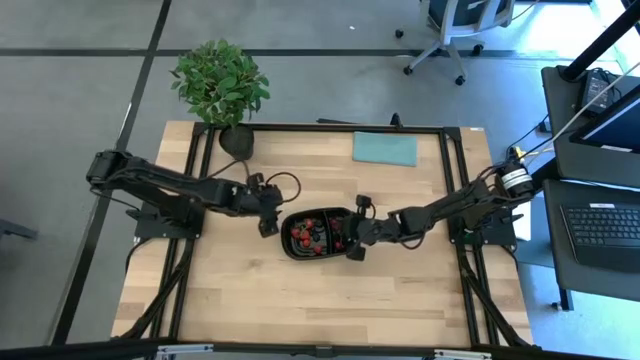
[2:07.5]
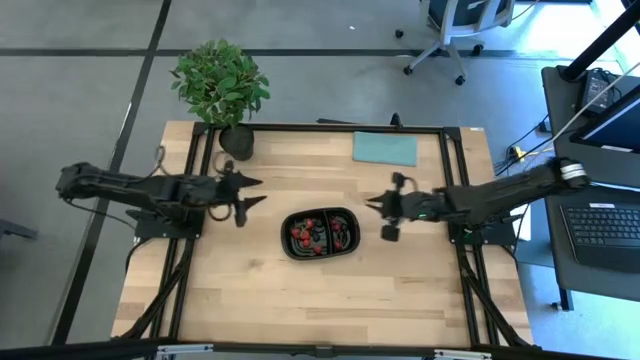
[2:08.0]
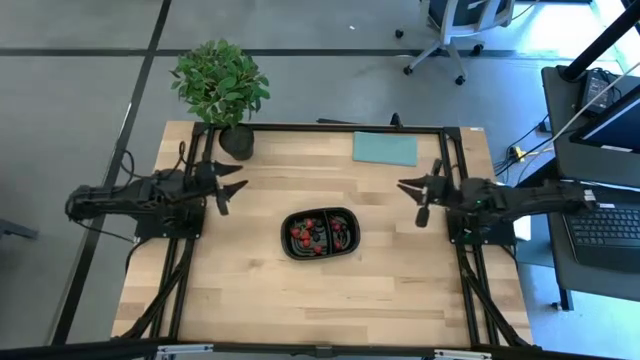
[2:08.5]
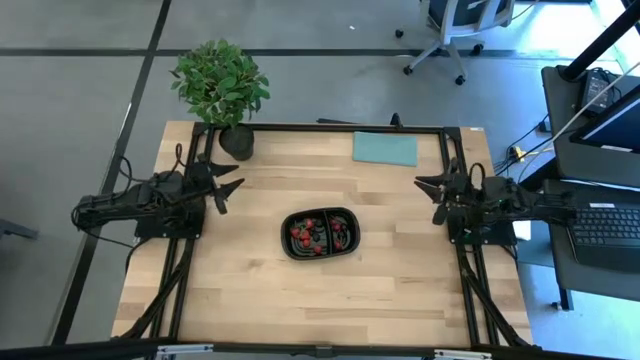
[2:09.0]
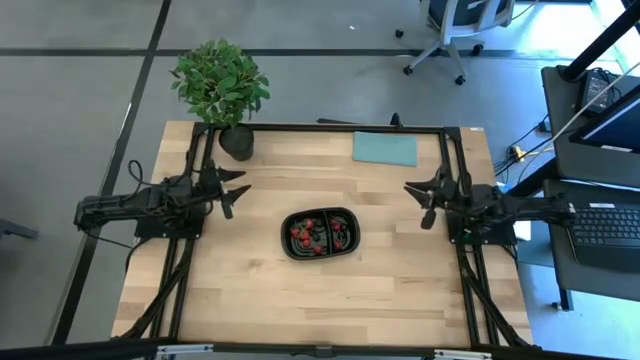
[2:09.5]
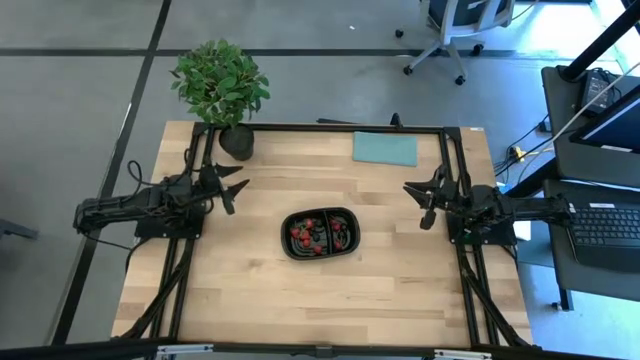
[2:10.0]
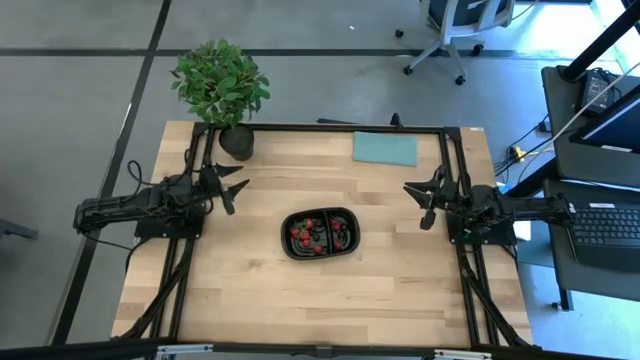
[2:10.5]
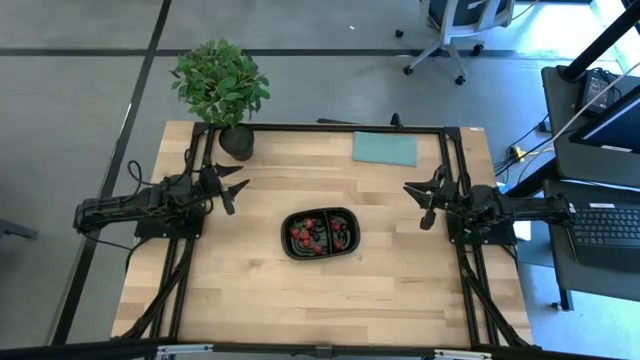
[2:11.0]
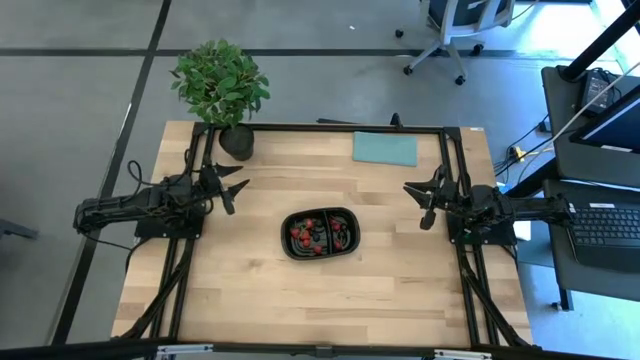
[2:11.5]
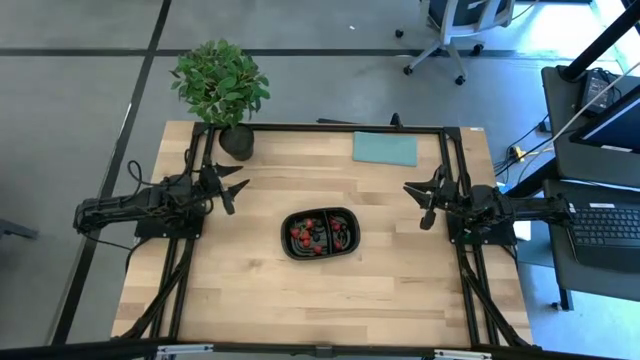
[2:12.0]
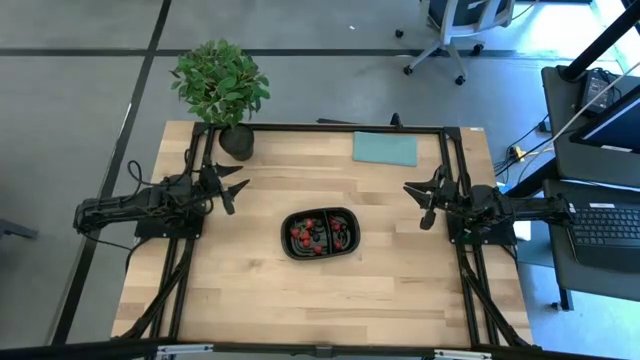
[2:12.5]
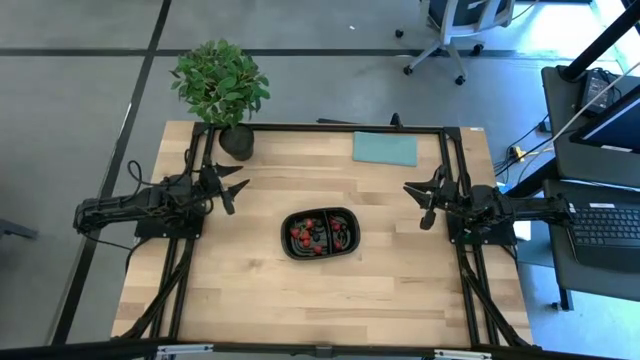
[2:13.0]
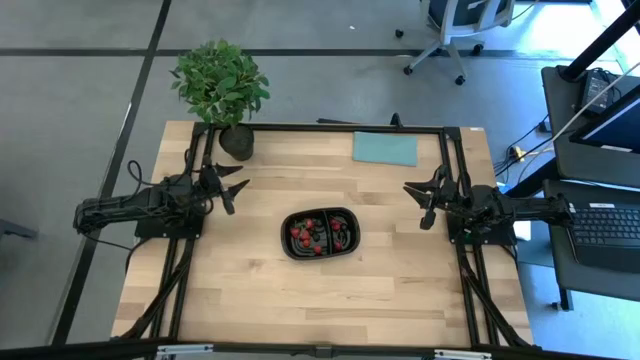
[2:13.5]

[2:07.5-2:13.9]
Task: Pick and placing Produce into tupperware
Return to Home Position

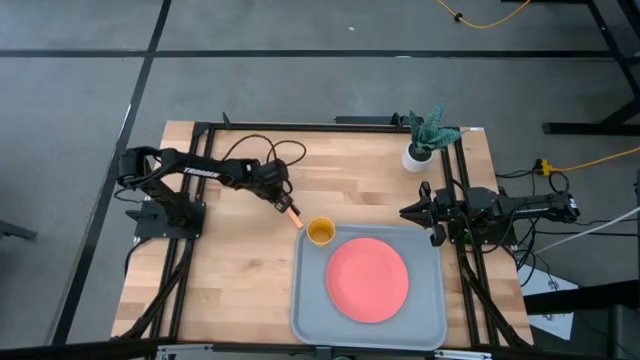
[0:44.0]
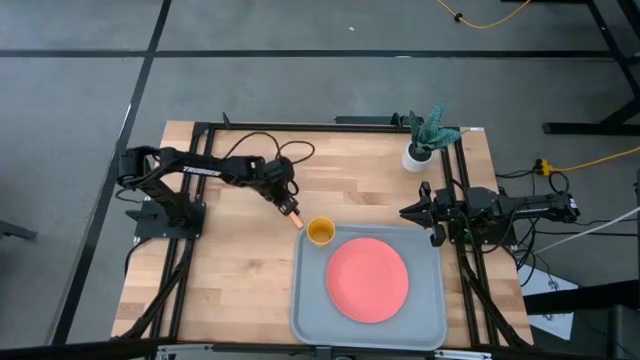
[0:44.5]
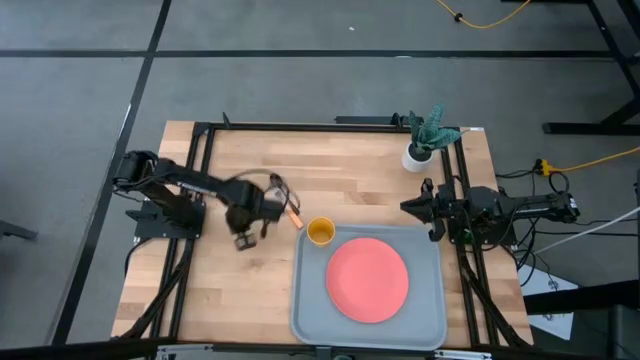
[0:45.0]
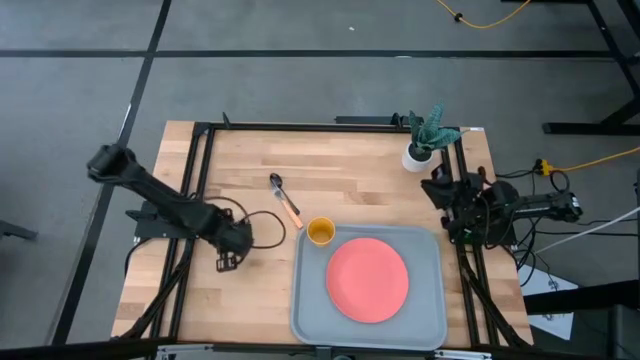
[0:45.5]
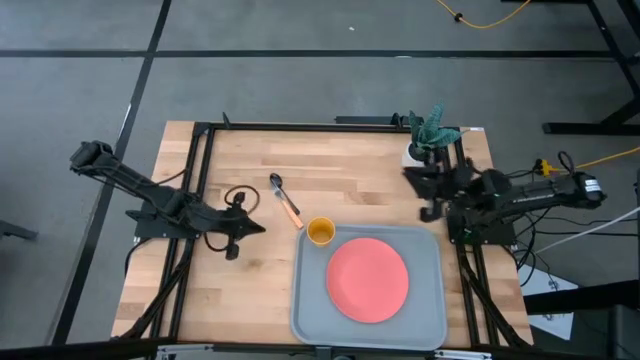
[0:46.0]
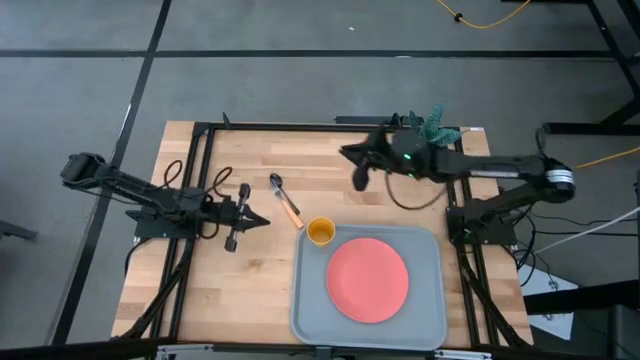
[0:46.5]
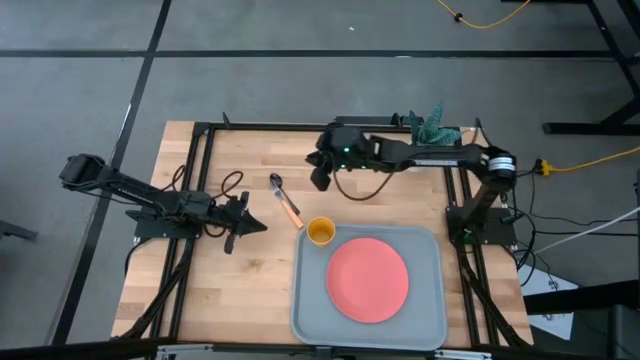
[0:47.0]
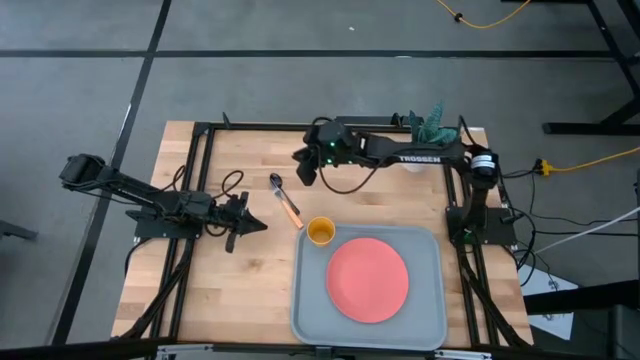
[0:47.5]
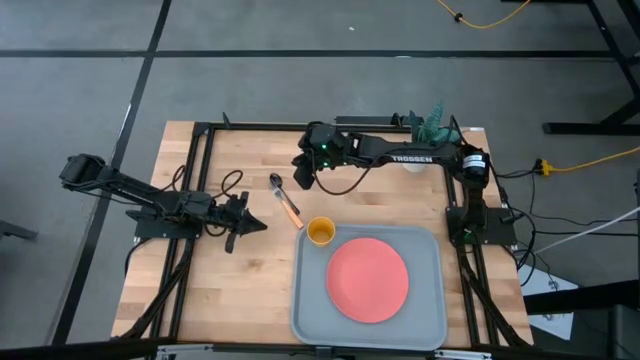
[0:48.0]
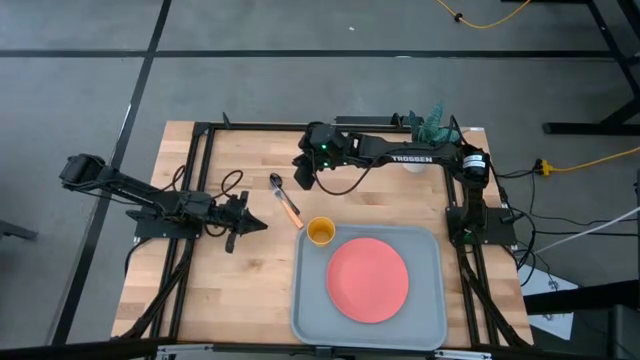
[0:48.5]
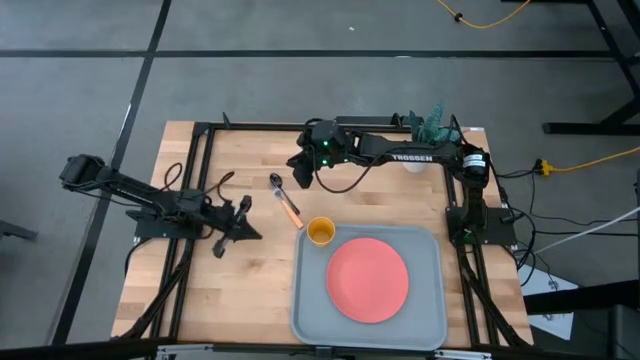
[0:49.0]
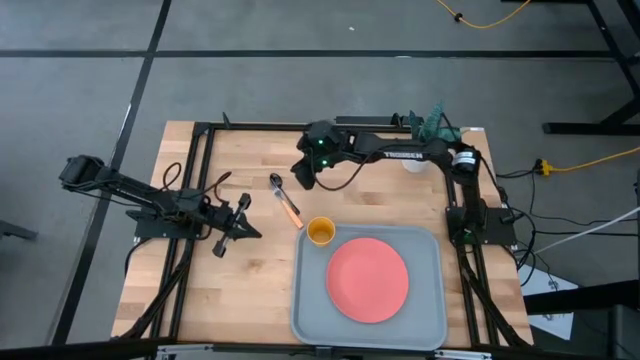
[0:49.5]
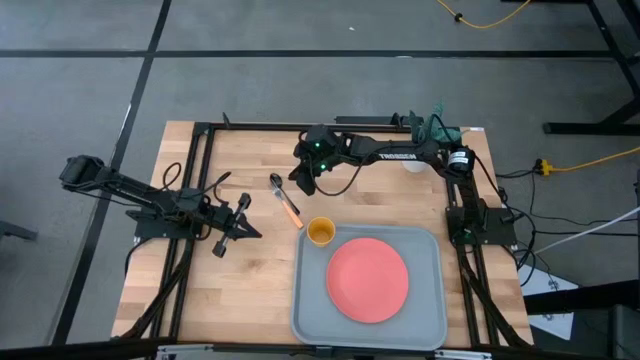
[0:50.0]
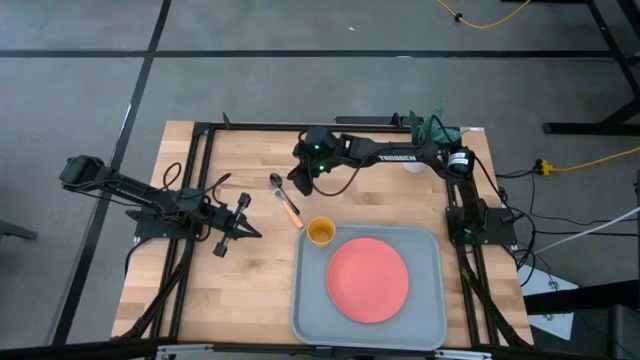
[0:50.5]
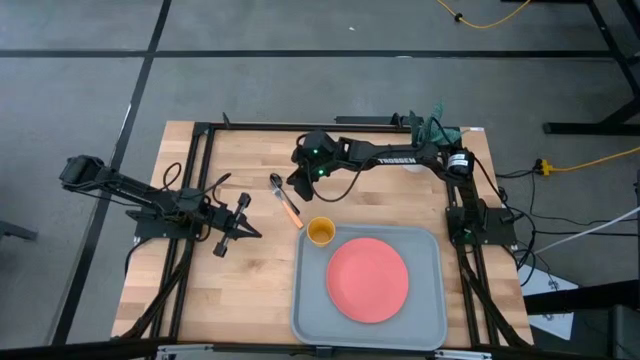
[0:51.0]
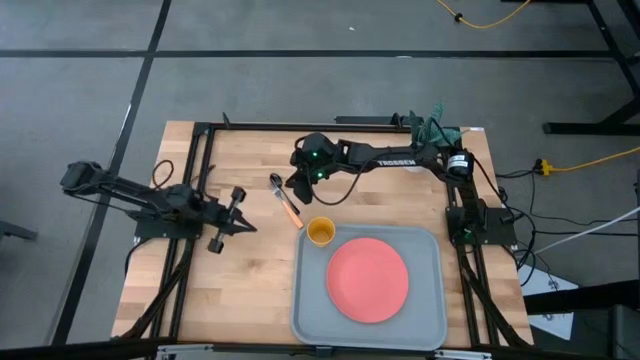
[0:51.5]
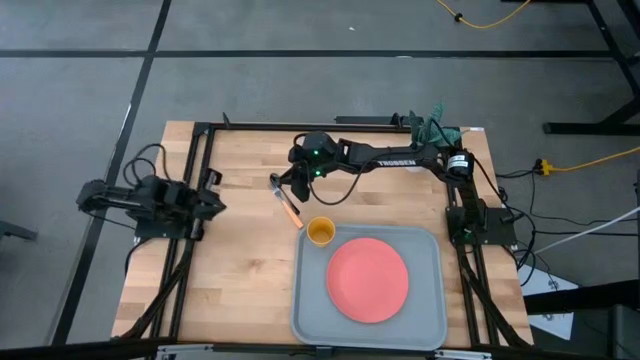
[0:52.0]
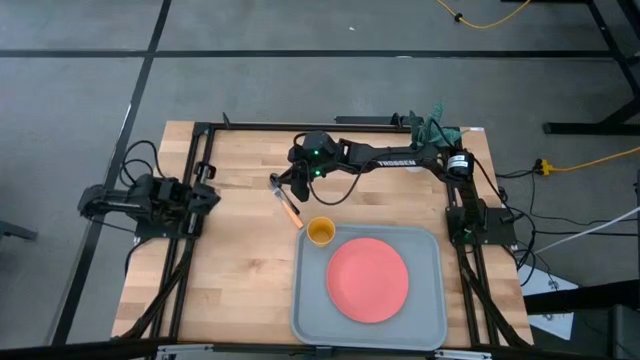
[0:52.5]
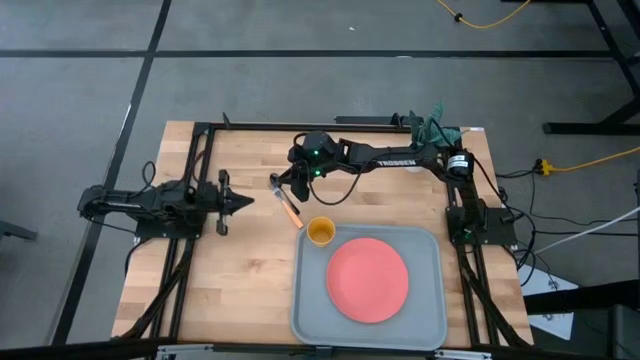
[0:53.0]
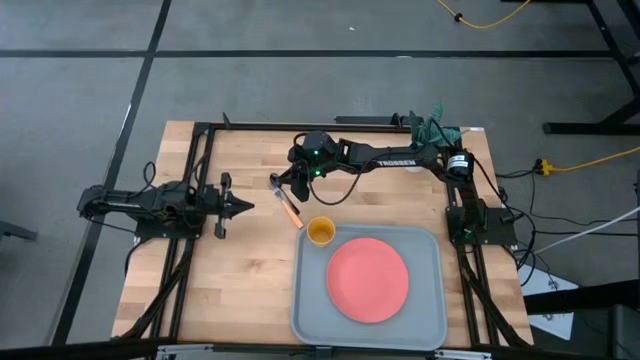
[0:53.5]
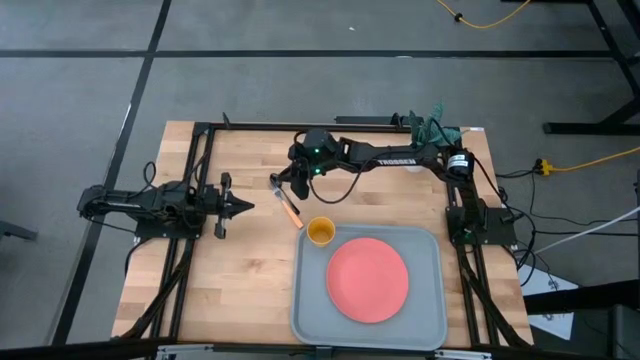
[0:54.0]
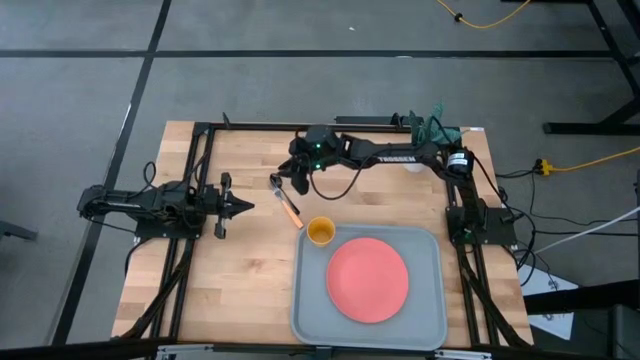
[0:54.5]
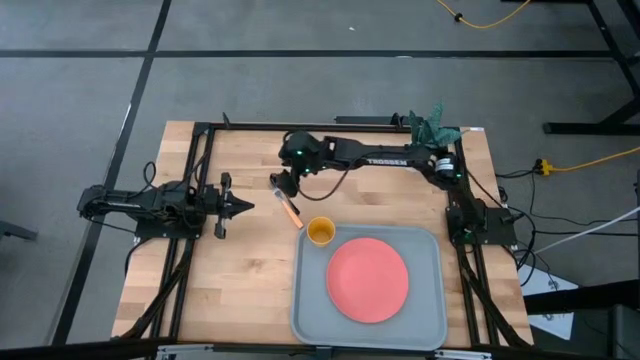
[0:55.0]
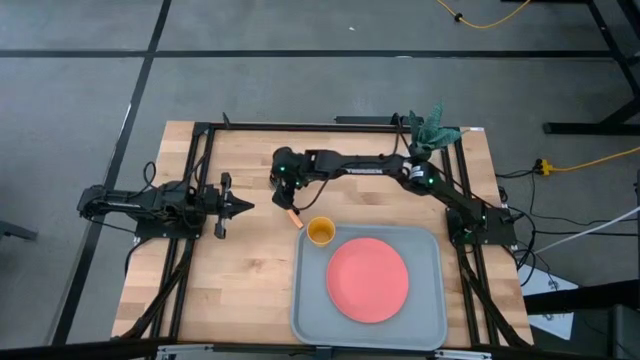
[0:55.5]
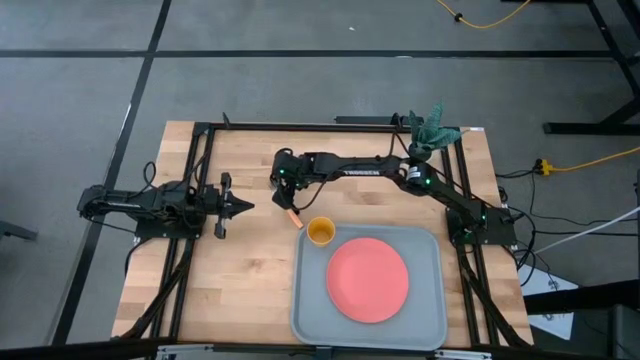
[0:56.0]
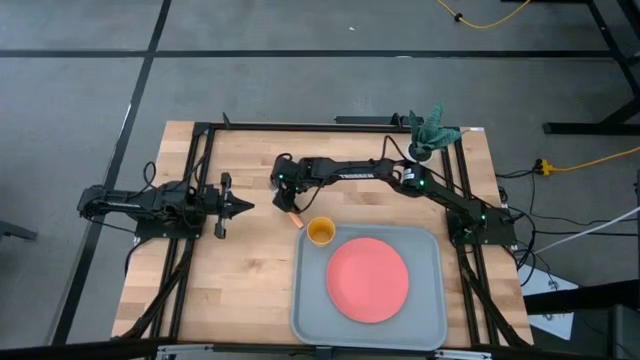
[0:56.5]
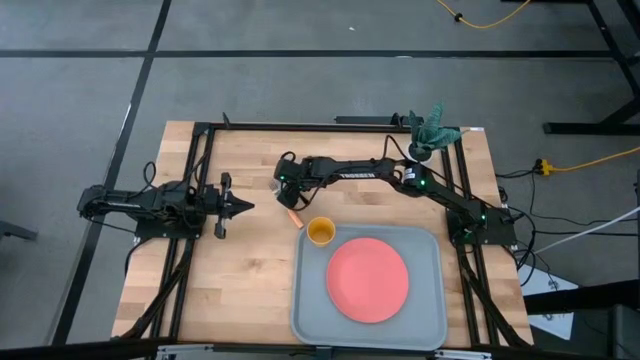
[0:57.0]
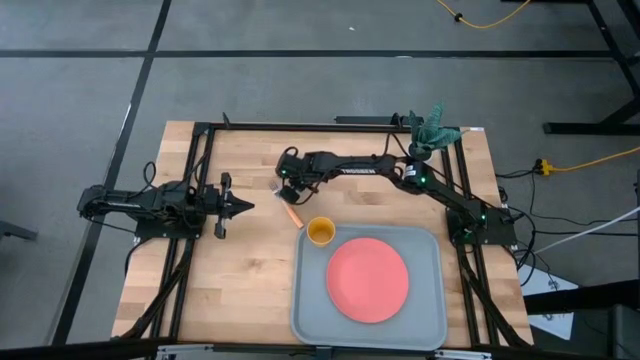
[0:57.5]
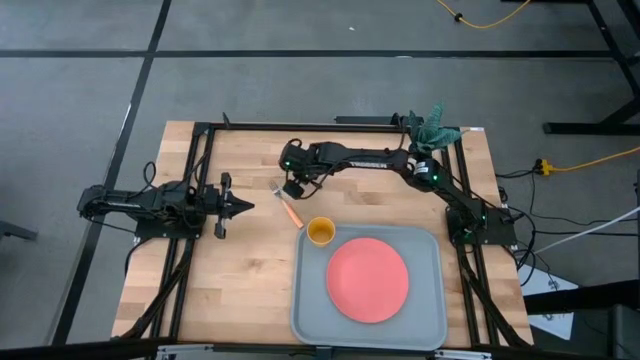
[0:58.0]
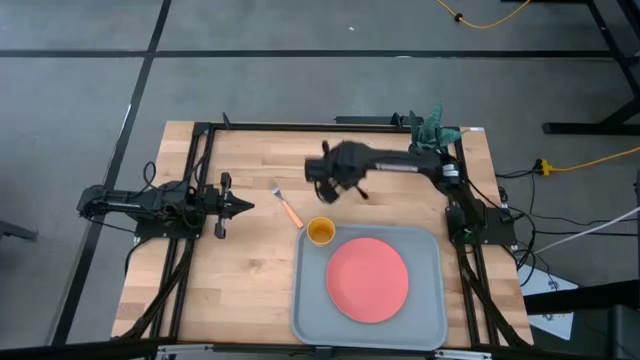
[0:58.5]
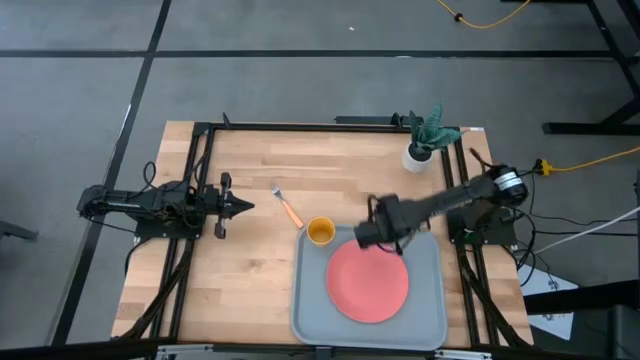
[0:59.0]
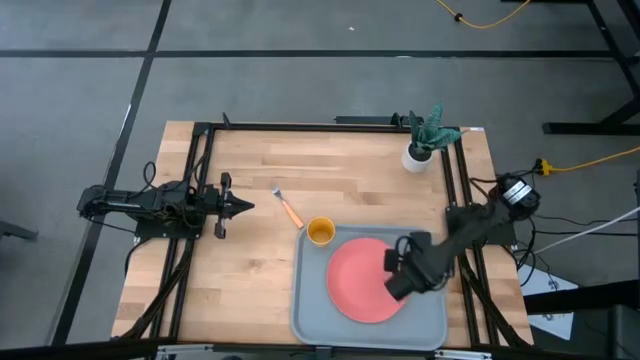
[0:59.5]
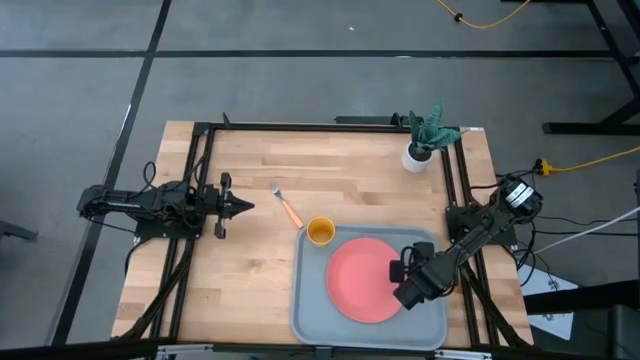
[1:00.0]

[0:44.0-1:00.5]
Task: Pick and place plate/cup/fork/spoon on tray
Put the black spoon on the light blue serving tray to the right of the pink plate
